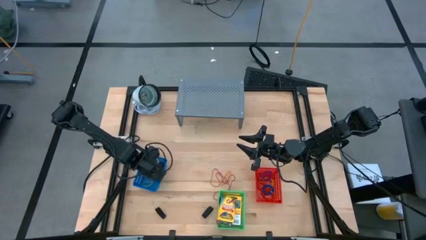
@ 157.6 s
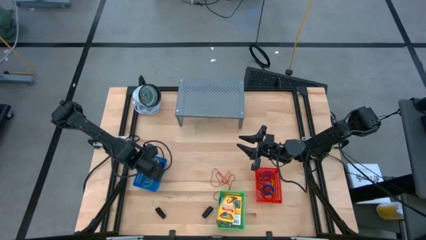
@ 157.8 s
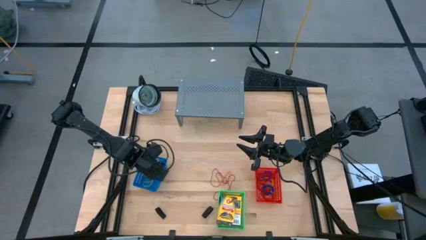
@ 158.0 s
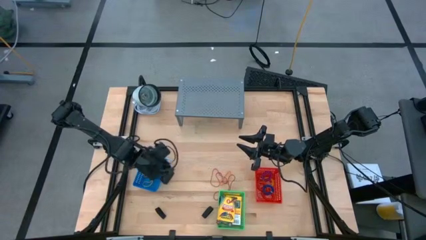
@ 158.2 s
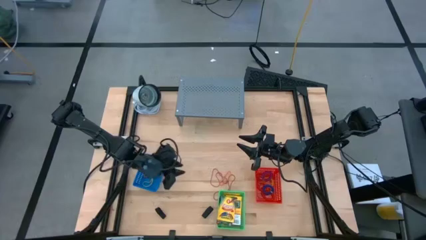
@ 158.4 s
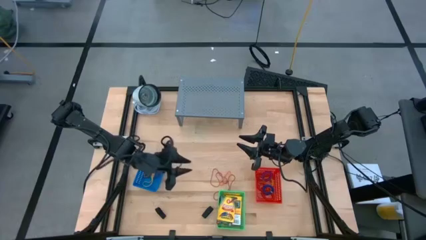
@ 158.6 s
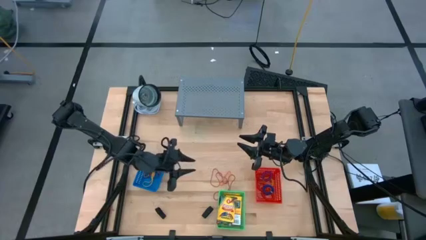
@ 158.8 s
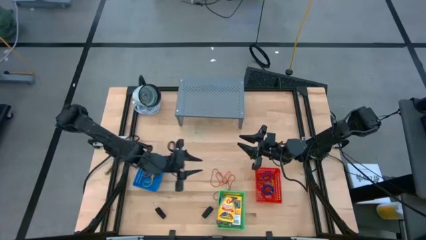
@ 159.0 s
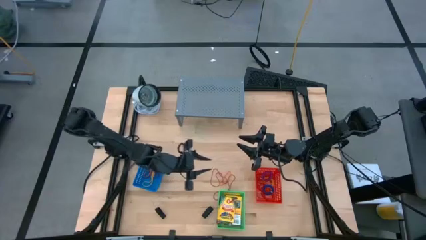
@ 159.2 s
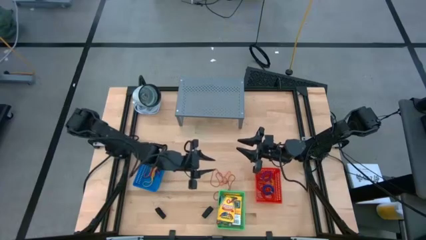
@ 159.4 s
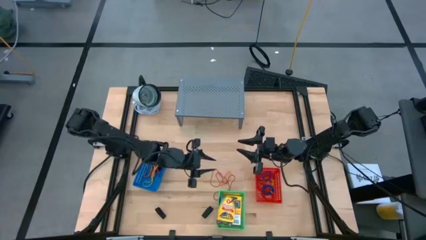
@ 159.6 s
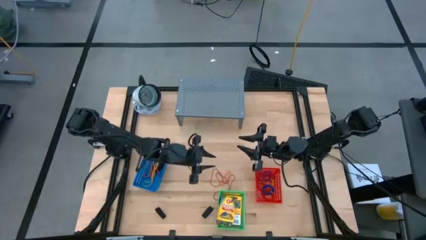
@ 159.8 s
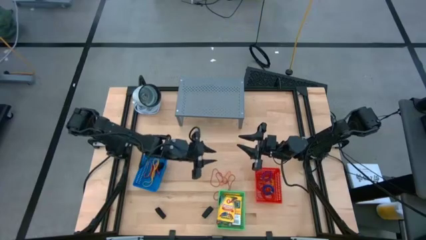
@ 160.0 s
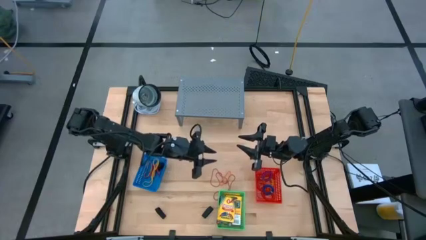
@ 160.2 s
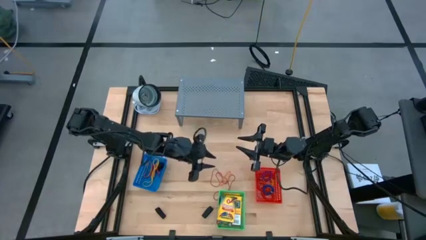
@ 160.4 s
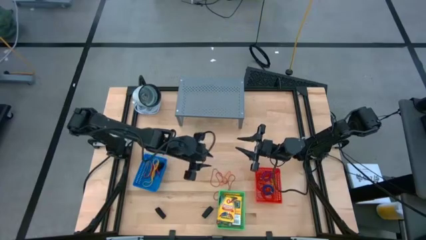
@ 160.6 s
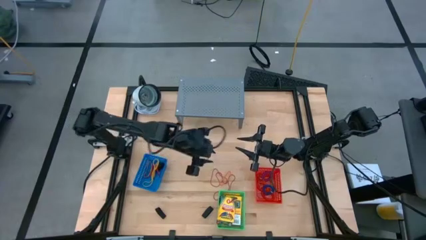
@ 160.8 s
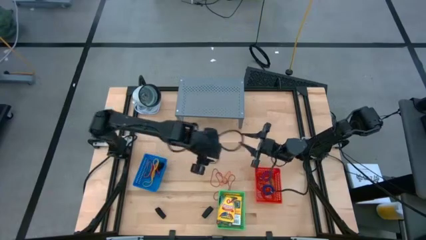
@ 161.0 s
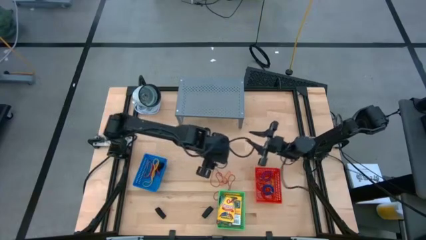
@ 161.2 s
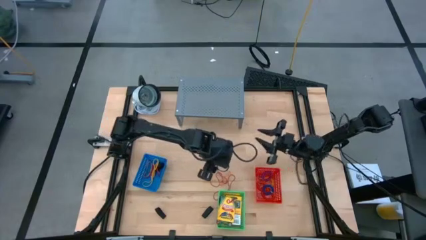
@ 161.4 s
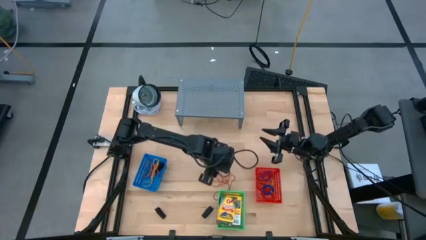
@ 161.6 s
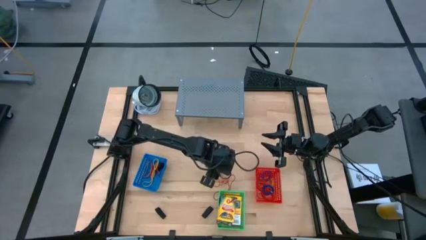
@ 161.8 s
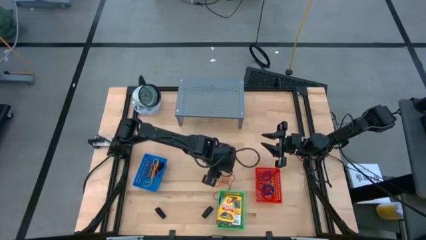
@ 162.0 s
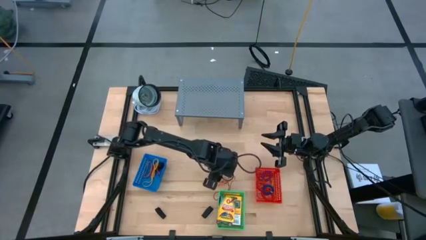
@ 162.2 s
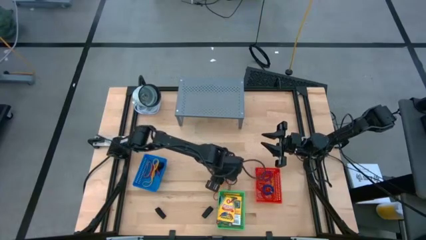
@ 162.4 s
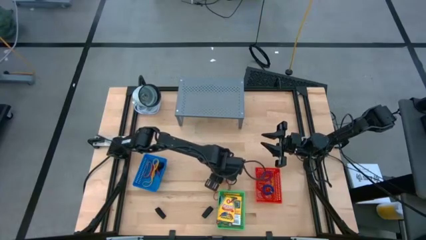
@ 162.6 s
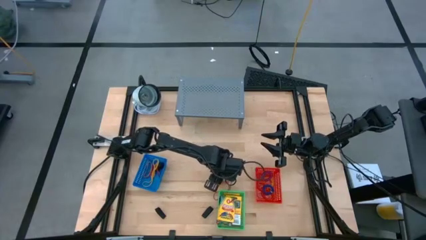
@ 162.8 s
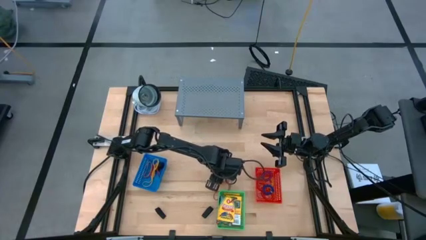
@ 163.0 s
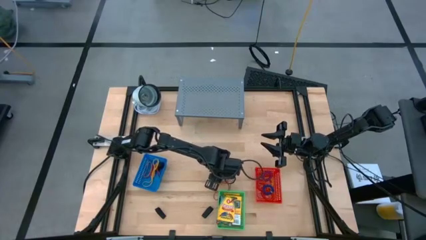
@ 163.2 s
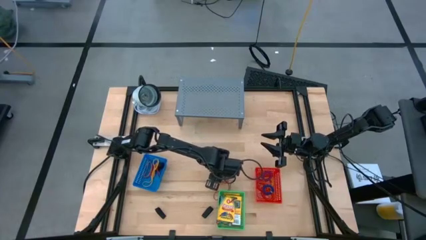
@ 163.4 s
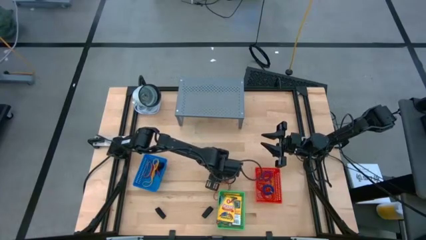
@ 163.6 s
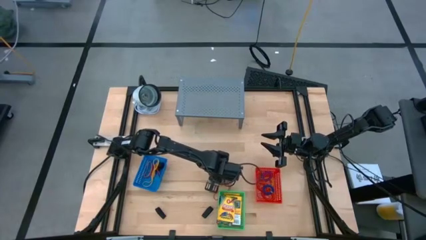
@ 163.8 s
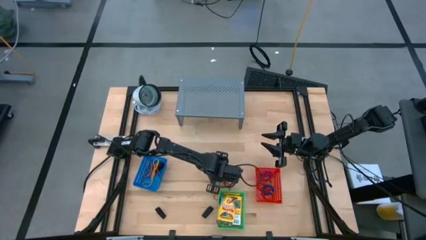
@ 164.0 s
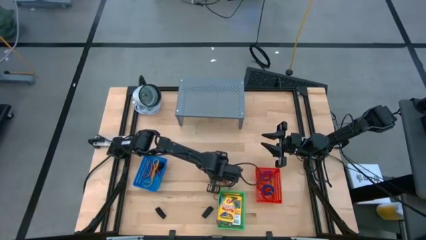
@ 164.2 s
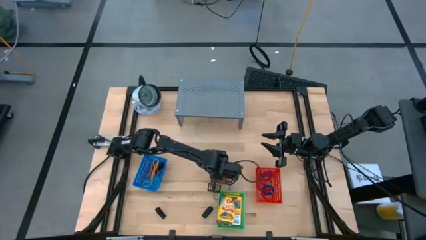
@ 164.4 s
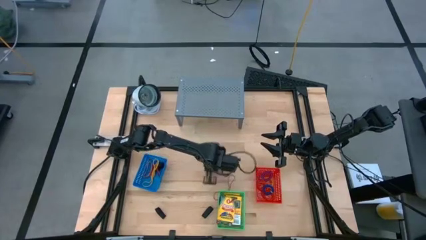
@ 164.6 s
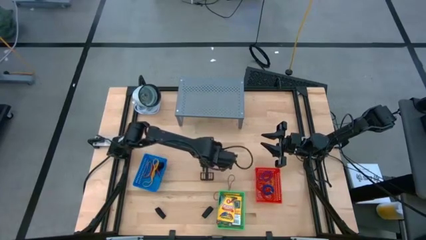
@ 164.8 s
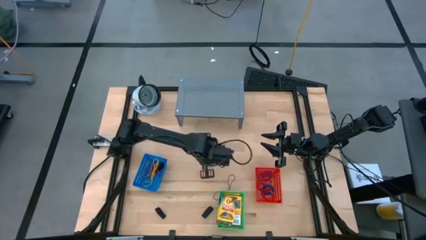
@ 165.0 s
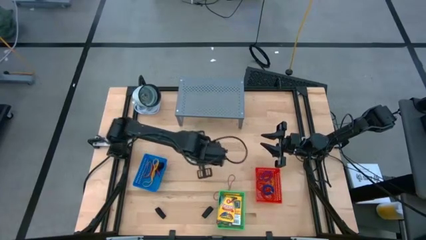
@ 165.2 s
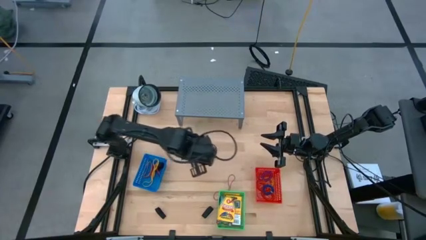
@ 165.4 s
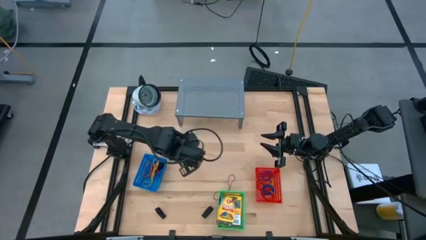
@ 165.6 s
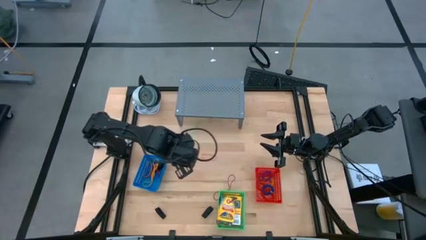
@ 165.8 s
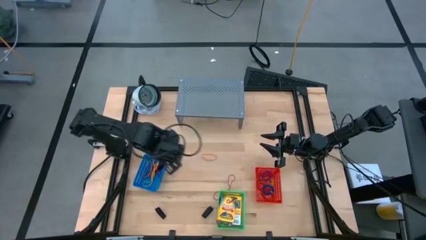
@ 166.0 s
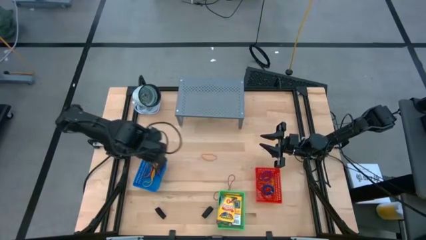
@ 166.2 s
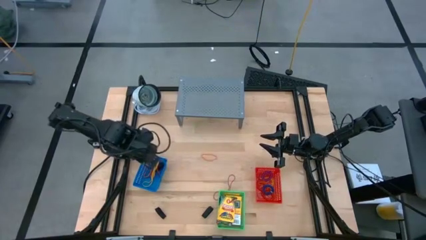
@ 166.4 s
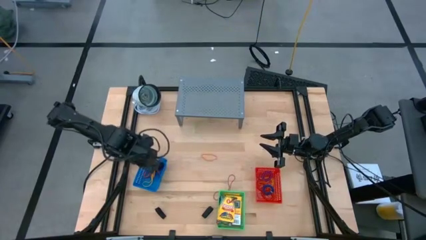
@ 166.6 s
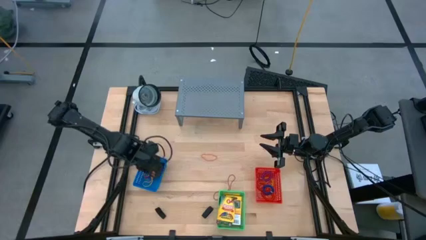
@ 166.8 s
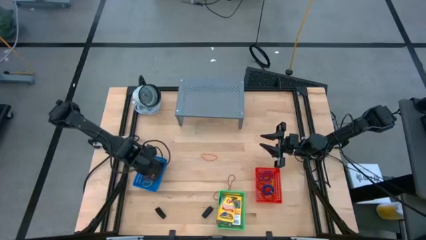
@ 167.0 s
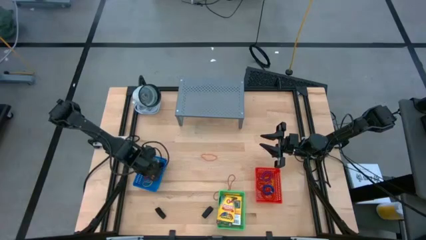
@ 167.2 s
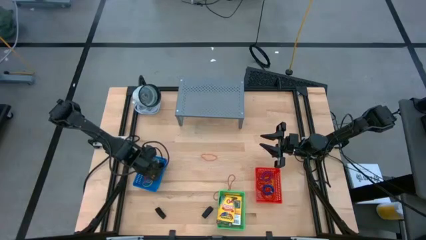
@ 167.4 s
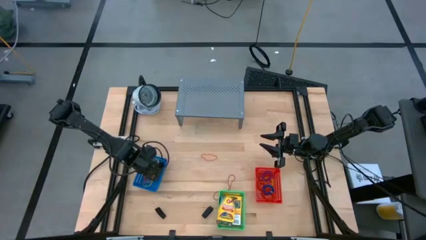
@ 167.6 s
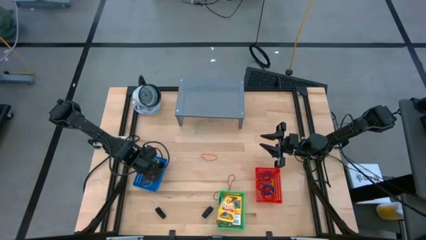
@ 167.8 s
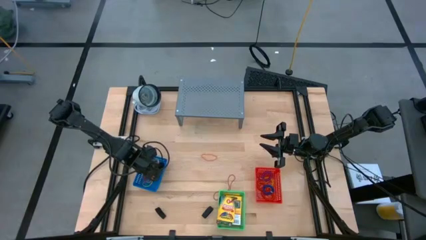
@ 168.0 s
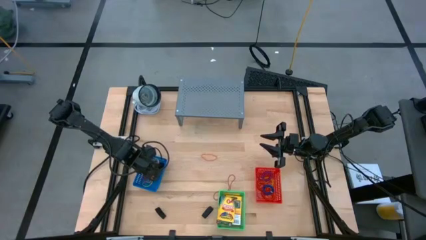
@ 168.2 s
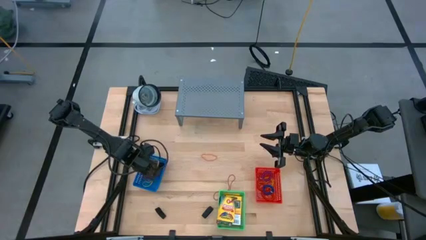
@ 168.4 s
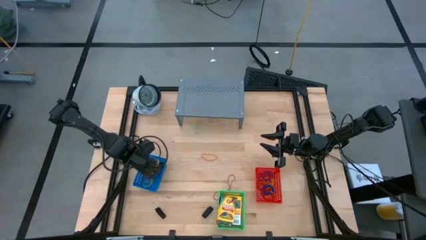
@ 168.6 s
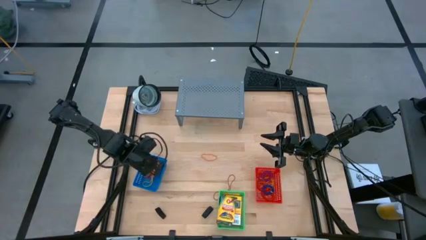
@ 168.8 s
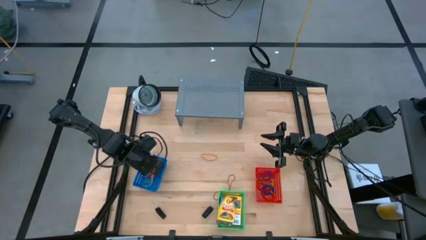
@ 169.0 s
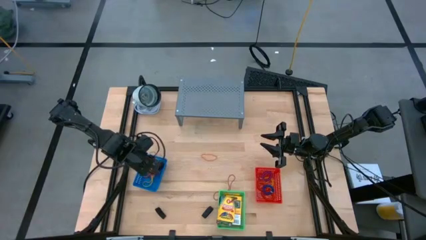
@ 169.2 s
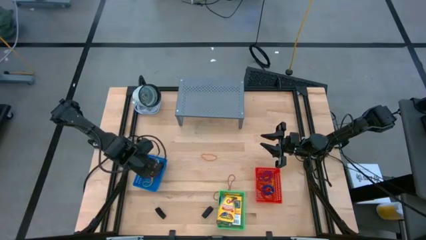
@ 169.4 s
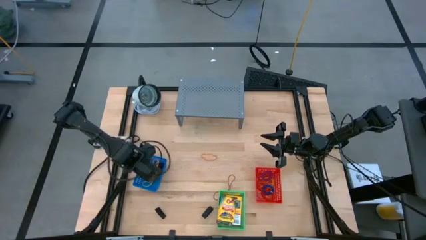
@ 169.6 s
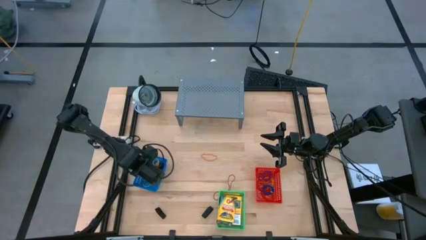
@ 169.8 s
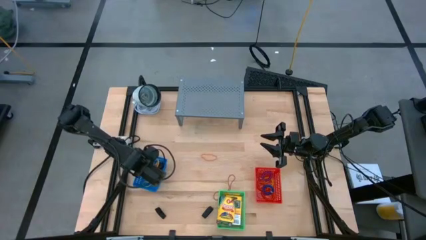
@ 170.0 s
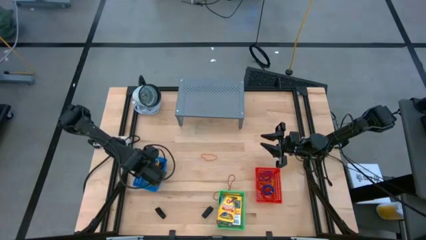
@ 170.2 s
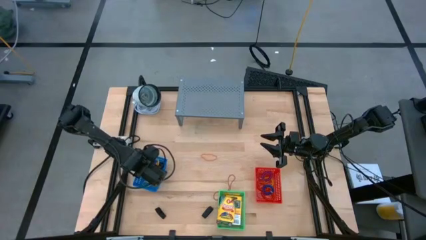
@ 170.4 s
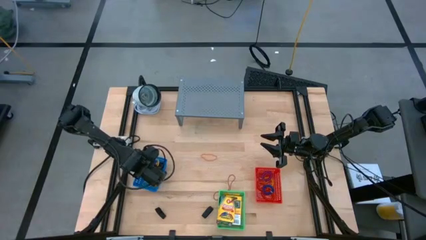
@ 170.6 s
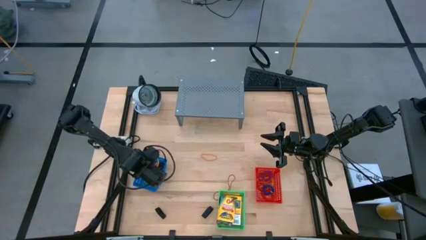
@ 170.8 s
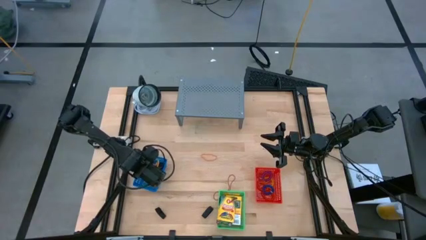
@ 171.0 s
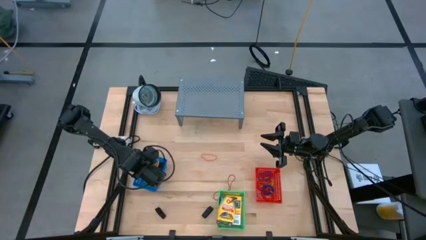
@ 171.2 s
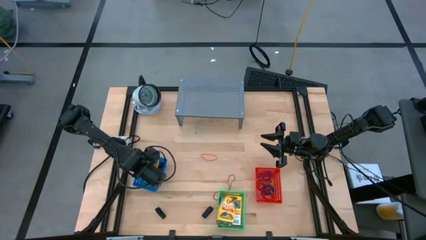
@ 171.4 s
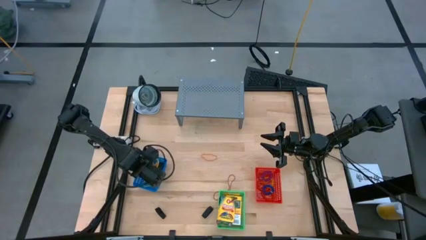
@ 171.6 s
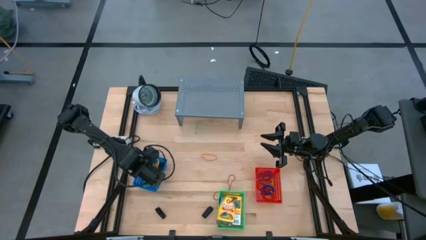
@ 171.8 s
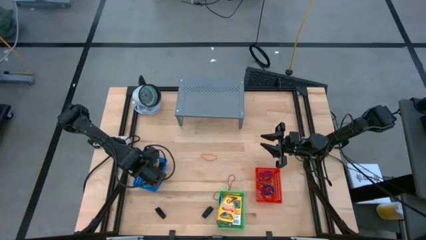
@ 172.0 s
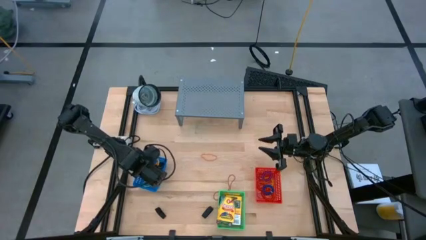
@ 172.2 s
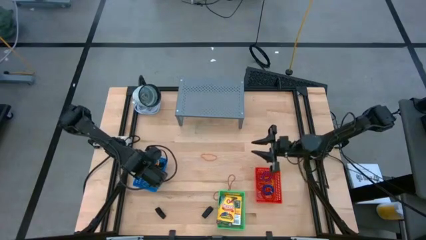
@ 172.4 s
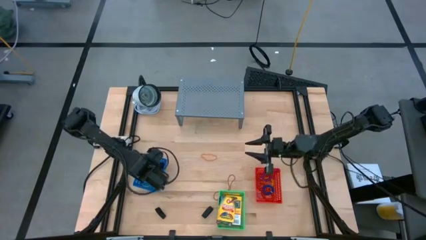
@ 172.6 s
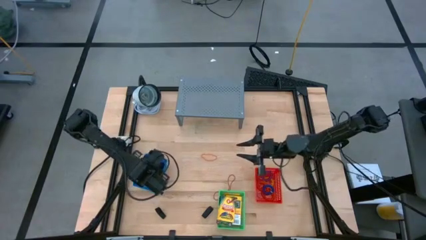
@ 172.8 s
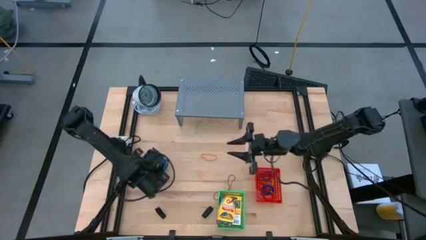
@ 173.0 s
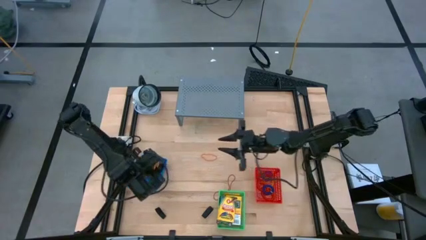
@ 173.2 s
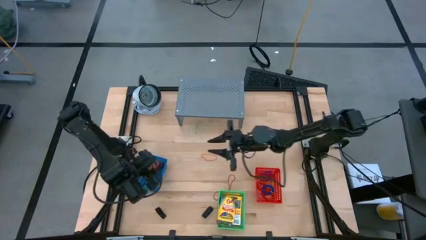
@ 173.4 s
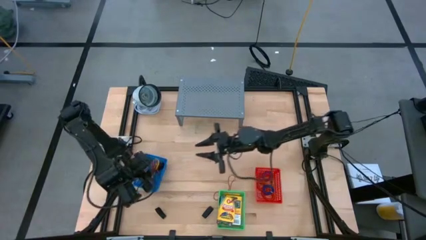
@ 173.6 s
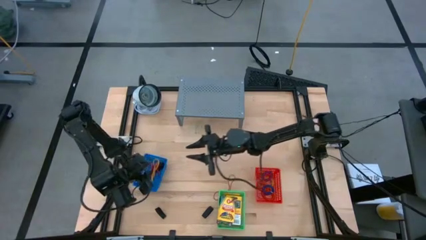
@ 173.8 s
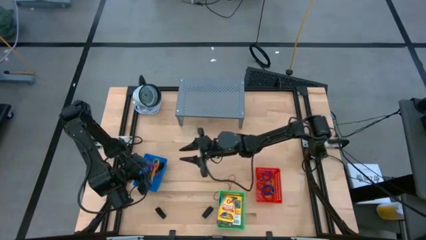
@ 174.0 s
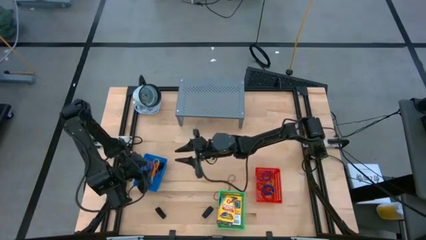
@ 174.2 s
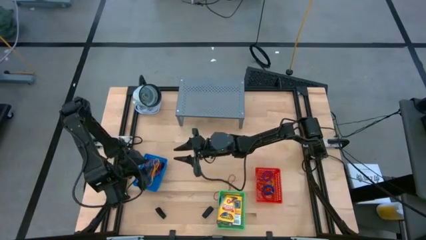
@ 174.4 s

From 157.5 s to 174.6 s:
Task: Pick & Place Office Desk Supplies
Put the red rubber band into the blue bin
